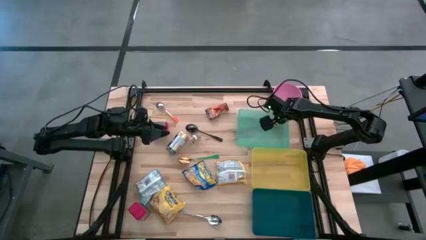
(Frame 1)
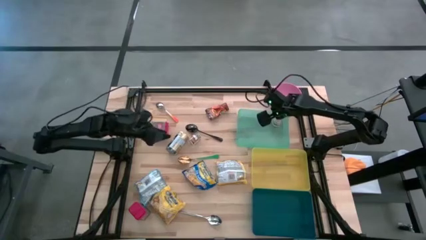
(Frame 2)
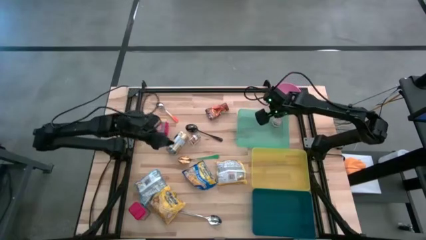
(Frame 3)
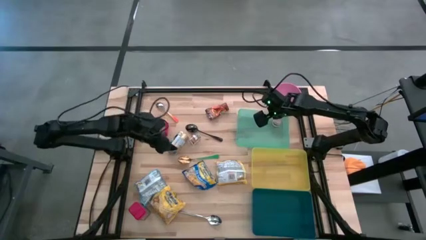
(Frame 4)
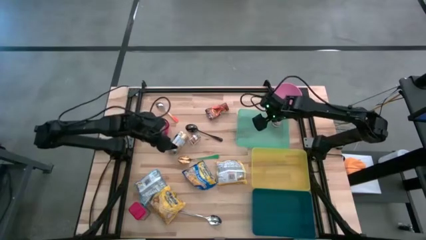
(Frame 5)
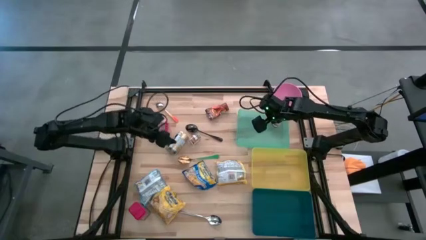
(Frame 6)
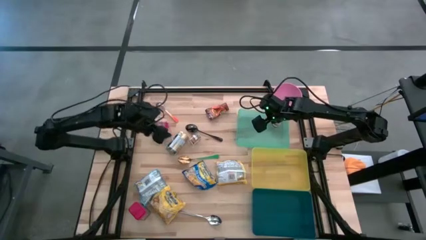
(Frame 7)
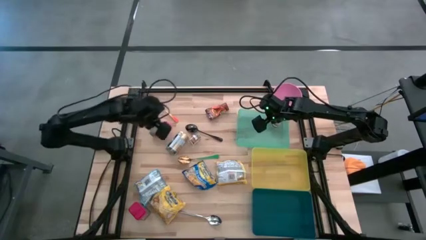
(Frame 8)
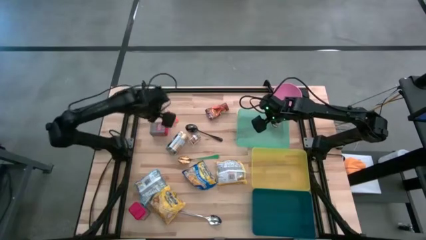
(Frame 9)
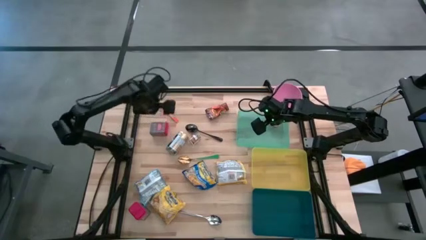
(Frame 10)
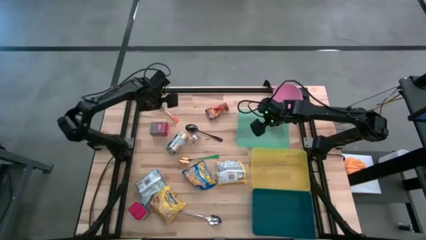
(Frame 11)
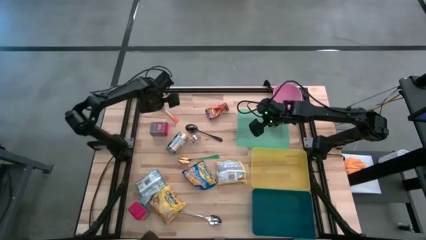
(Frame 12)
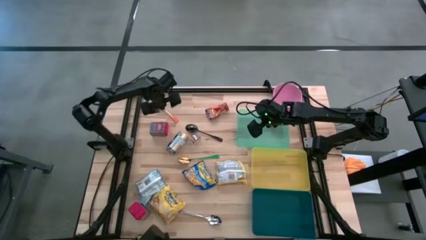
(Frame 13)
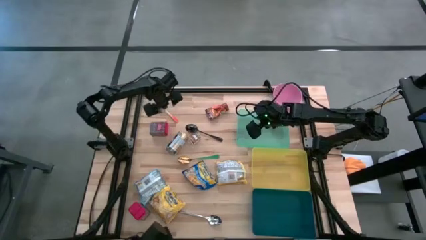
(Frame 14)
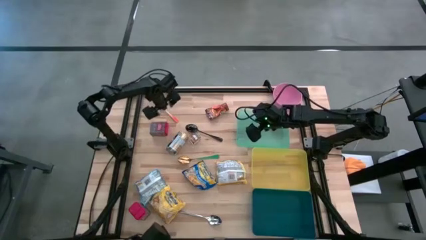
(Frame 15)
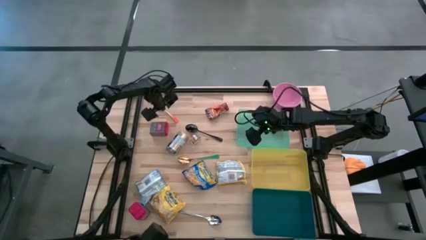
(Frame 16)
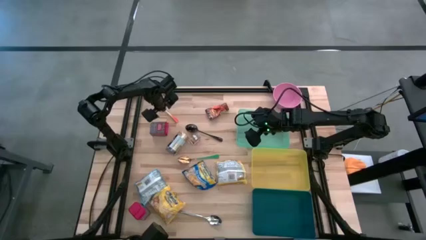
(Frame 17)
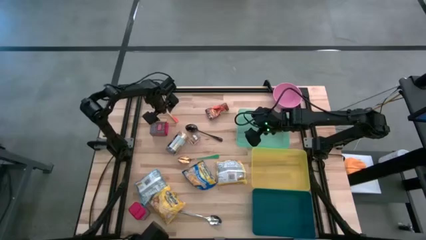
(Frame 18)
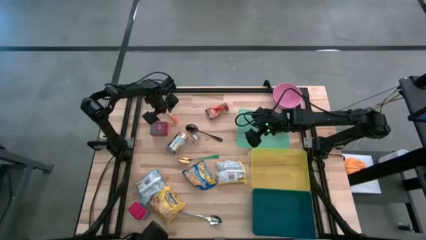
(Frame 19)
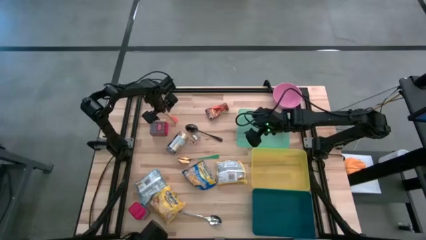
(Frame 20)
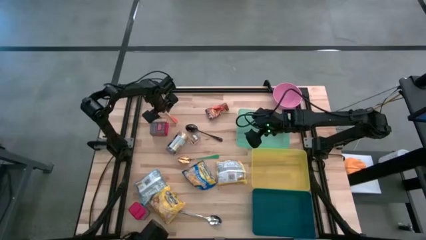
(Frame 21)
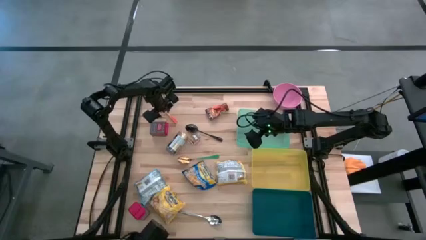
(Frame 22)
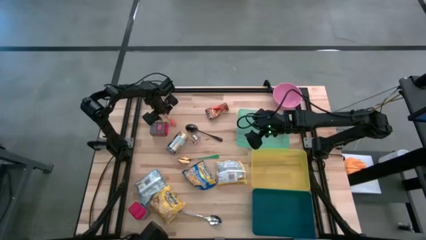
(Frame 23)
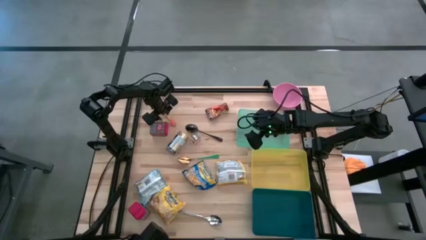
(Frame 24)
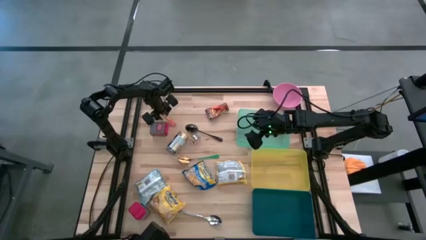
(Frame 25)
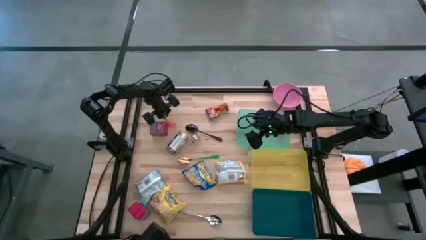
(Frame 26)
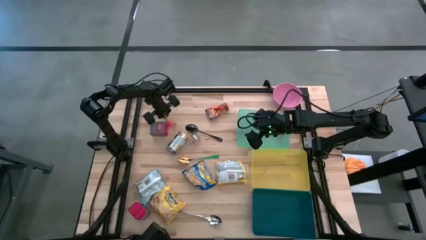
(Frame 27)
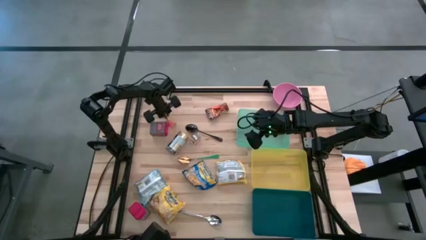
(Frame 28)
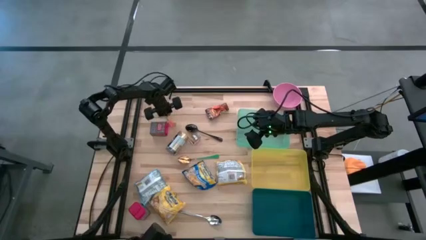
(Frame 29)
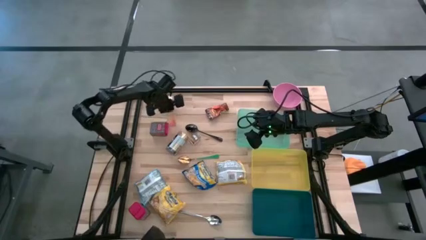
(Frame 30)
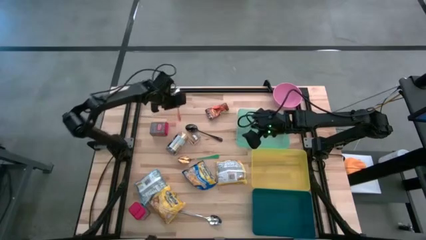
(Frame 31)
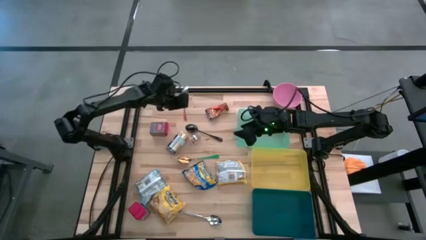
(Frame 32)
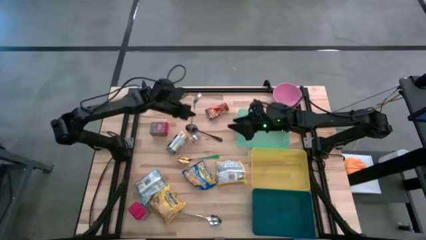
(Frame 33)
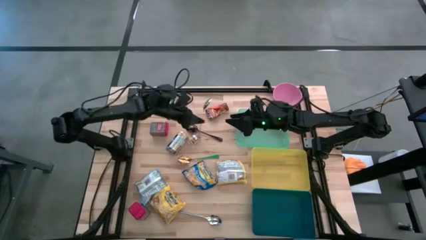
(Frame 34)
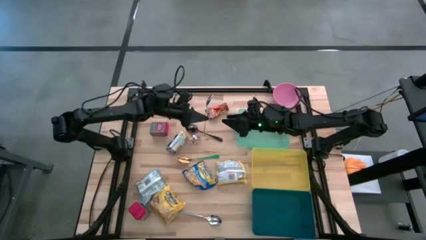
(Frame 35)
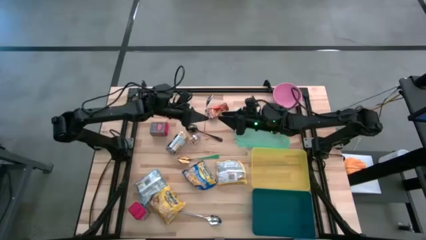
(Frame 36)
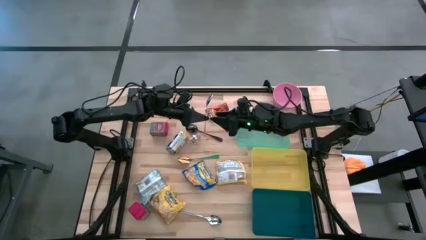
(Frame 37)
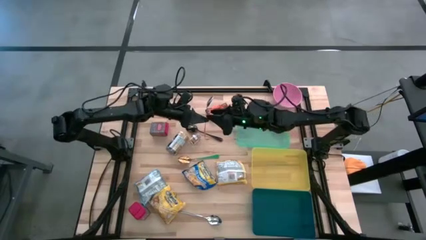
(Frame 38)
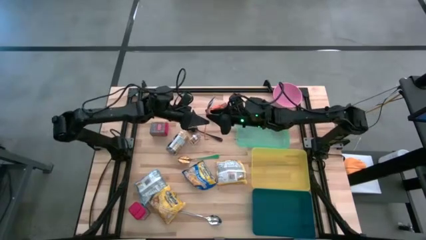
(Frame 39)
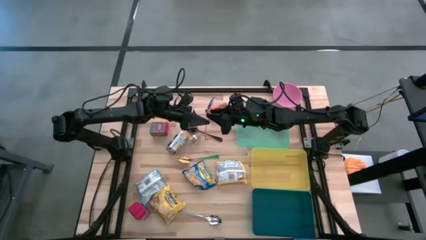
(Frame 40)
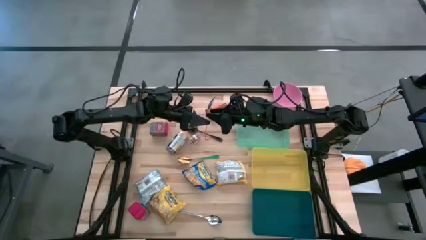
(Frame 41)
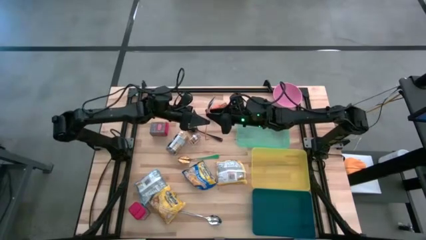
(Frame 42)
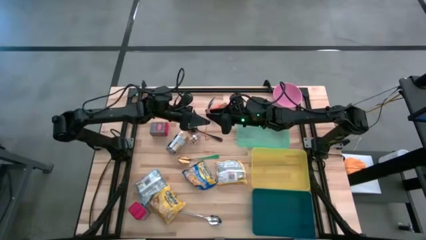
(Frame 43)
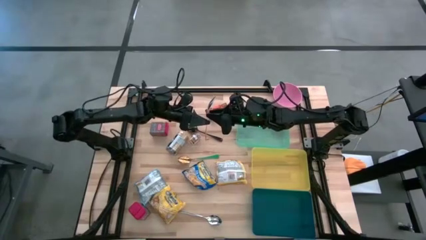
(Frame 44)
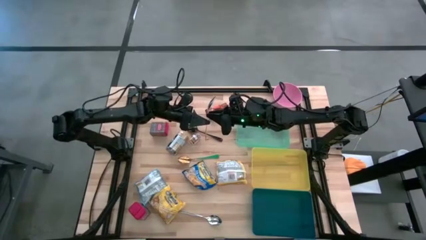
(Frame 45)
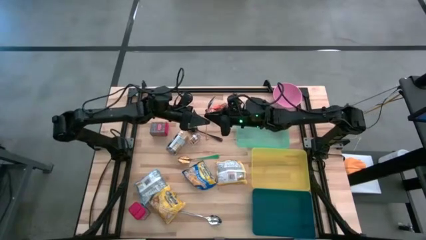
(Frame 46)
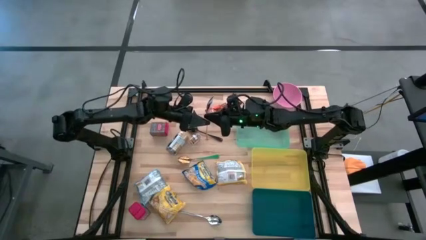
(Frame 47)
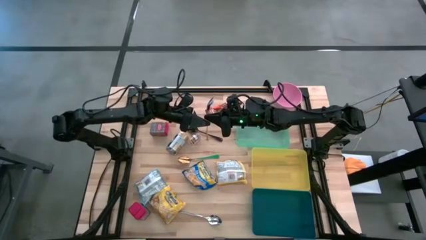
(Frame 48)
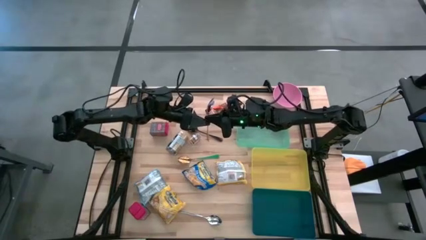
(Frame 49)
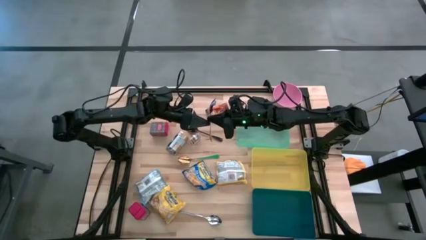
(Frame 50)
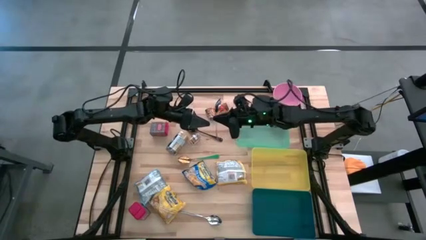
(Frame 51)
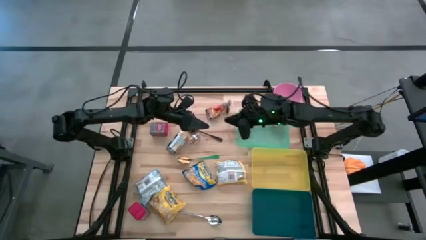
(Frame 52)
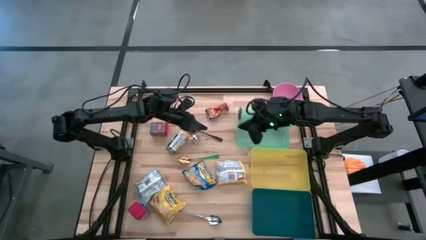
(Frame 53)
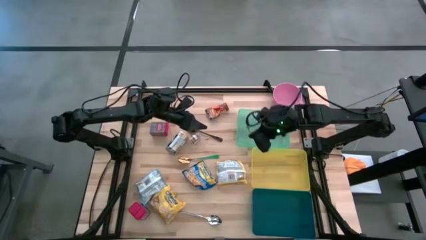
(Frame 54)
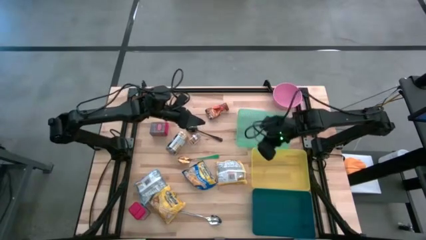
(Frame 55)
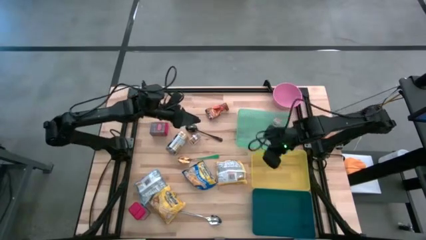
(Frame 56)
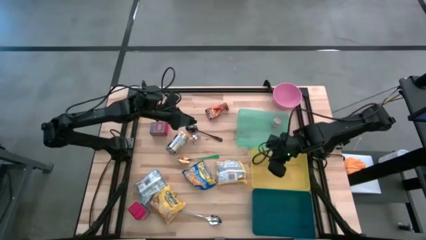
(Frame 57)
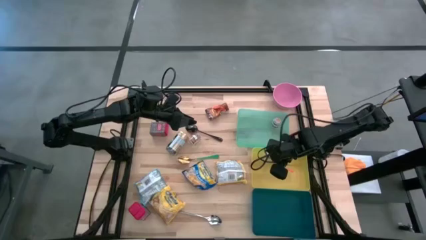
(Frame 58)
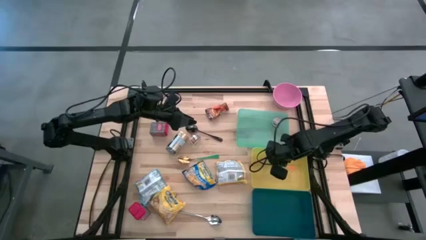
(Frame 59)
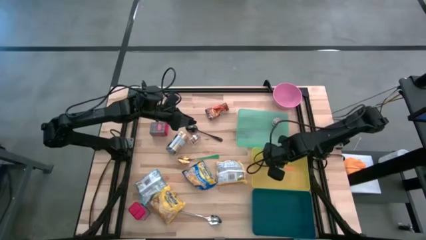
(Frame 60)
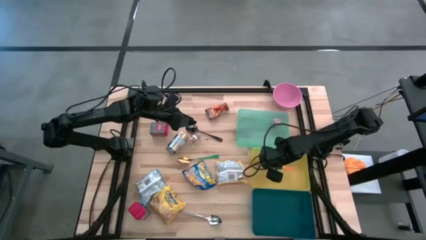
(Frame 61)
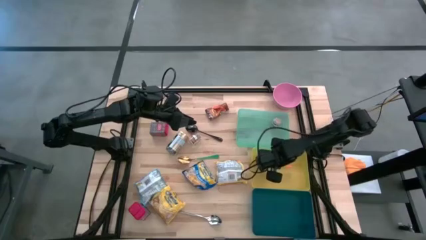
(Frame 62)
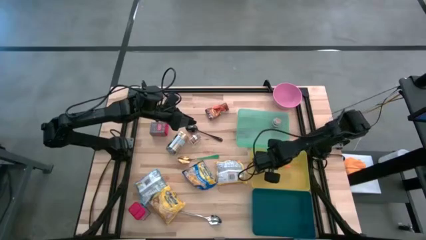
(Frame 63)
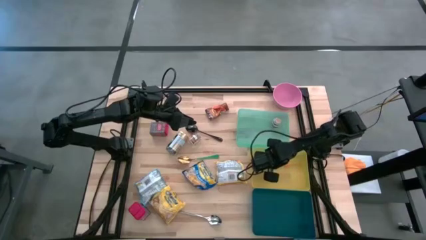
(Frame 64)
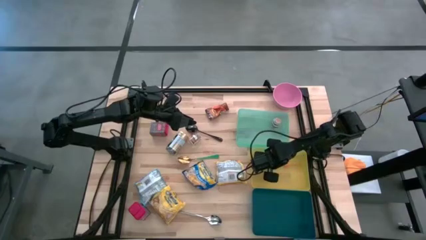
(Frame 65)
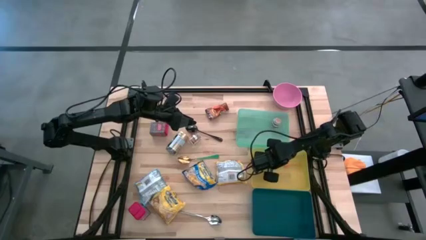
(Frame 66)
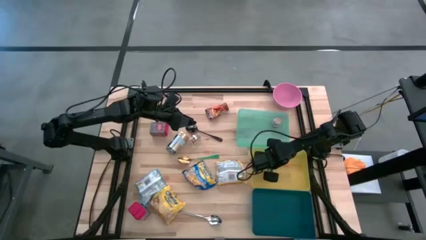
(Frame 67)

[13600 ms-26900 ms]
Put the orange spoon into the yellow bin
